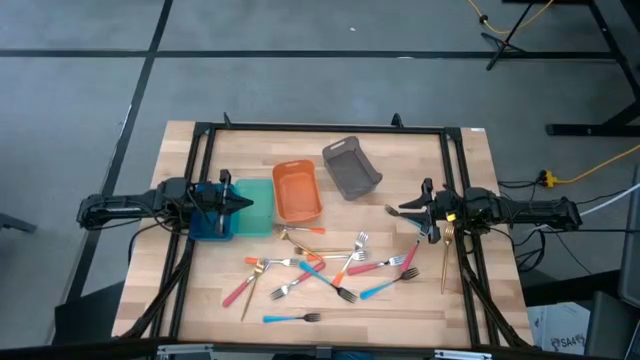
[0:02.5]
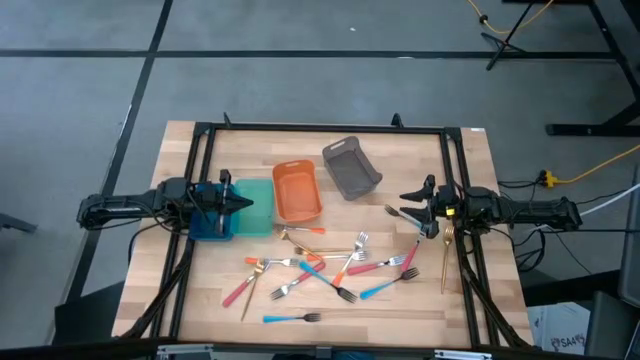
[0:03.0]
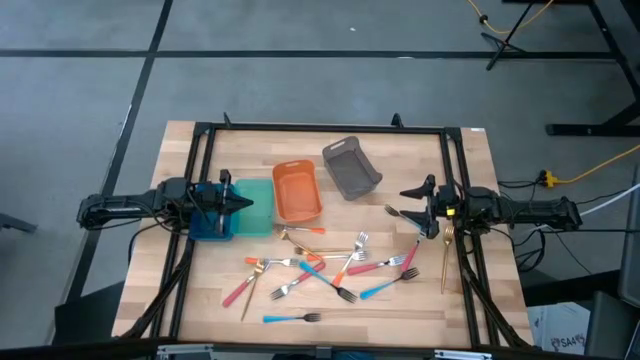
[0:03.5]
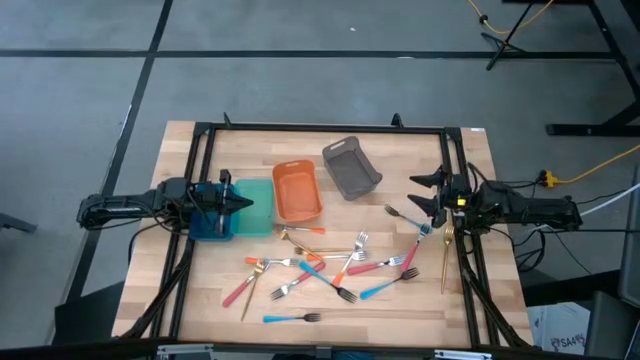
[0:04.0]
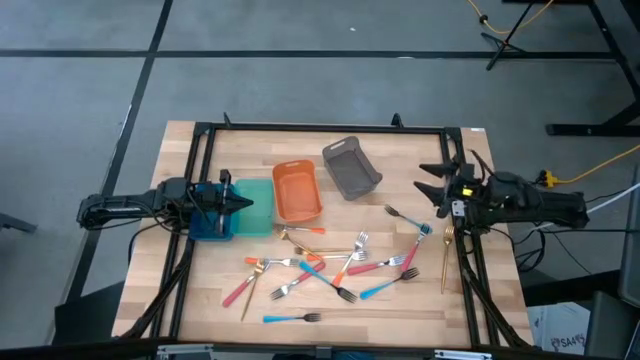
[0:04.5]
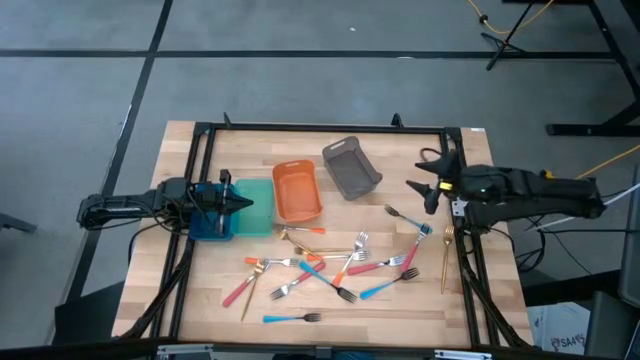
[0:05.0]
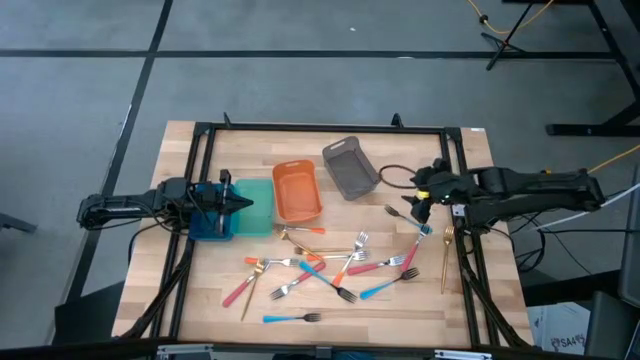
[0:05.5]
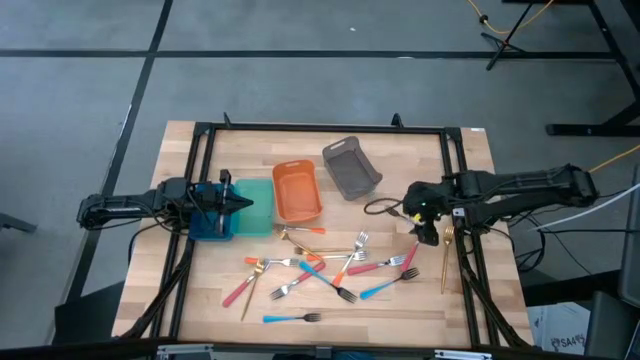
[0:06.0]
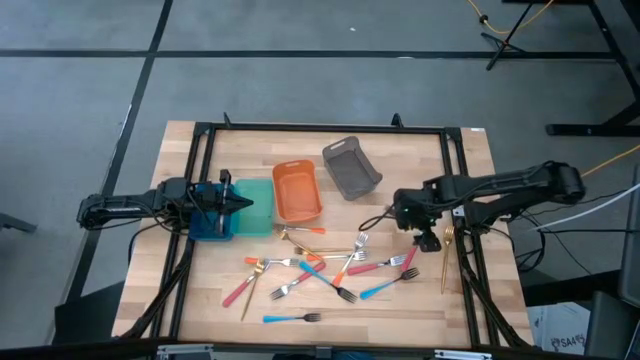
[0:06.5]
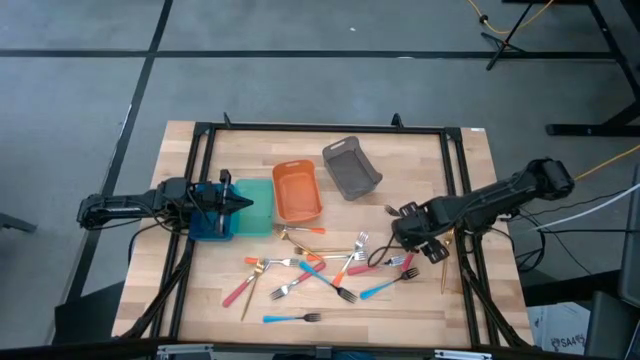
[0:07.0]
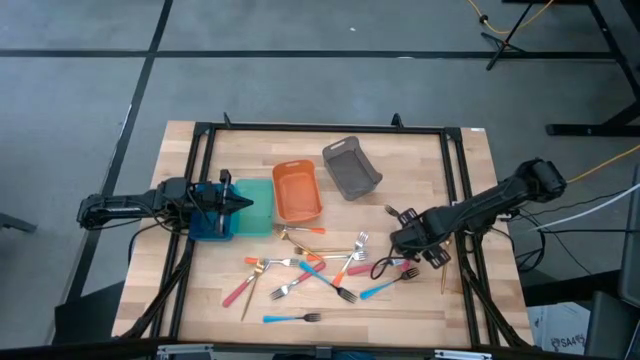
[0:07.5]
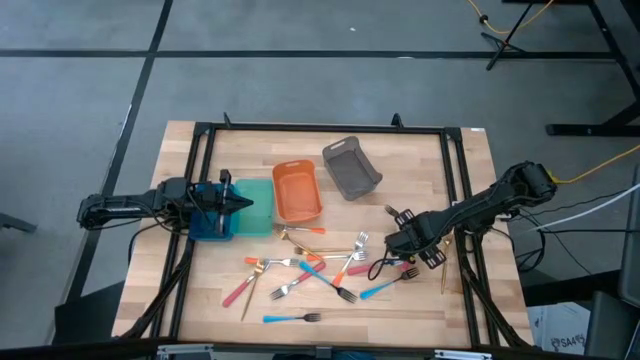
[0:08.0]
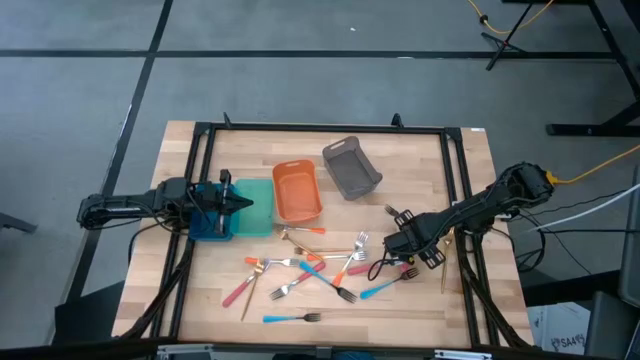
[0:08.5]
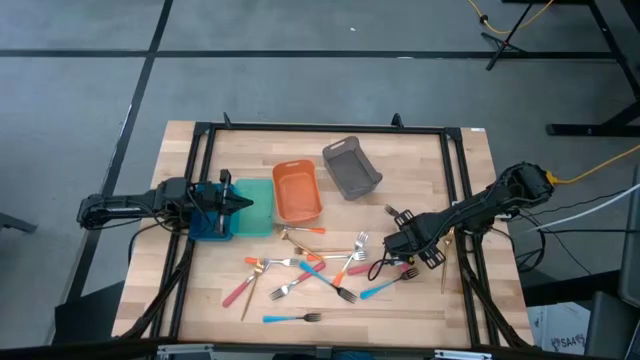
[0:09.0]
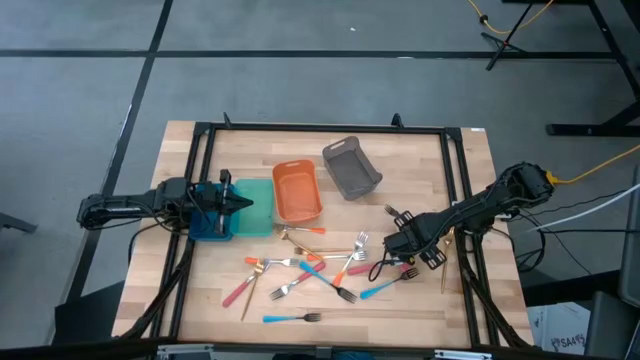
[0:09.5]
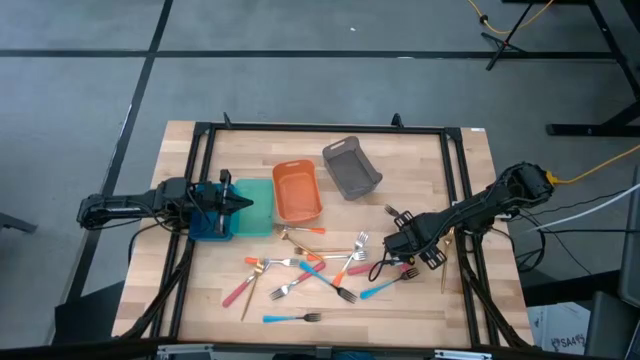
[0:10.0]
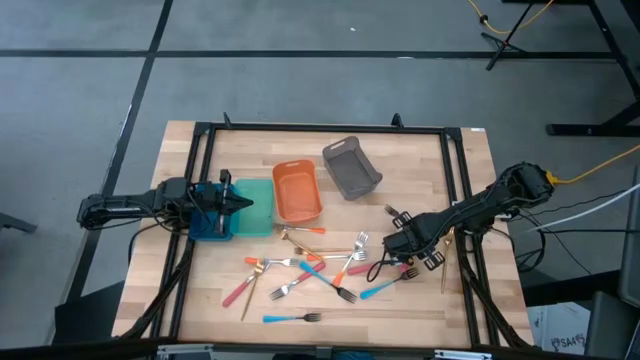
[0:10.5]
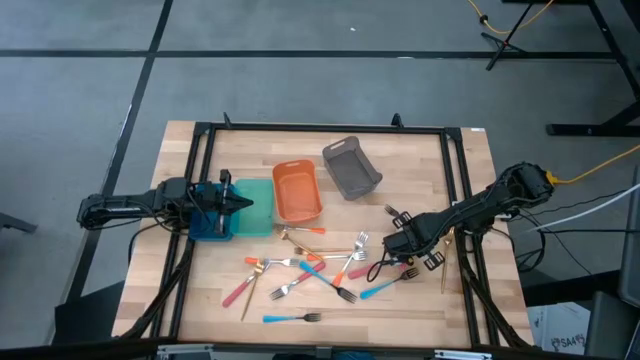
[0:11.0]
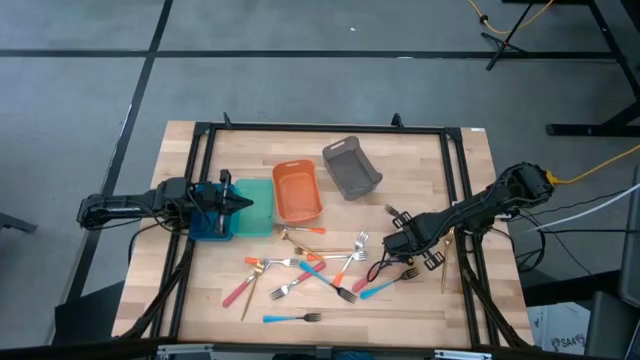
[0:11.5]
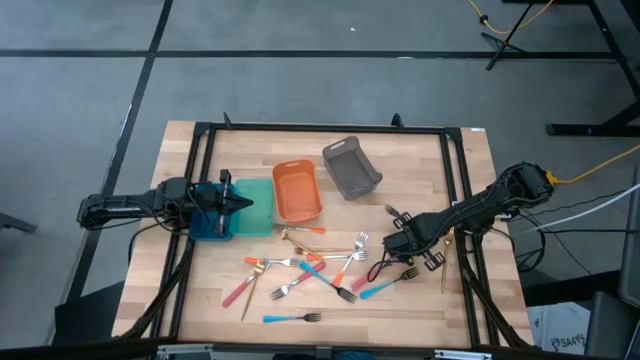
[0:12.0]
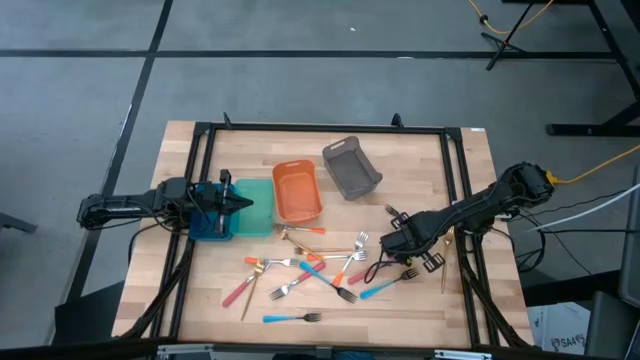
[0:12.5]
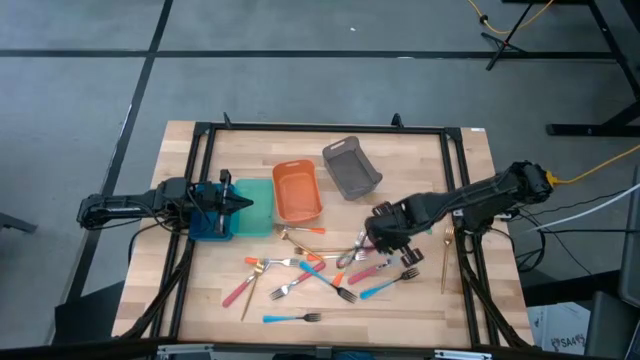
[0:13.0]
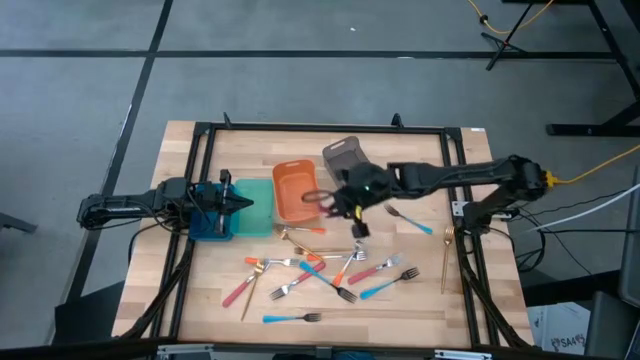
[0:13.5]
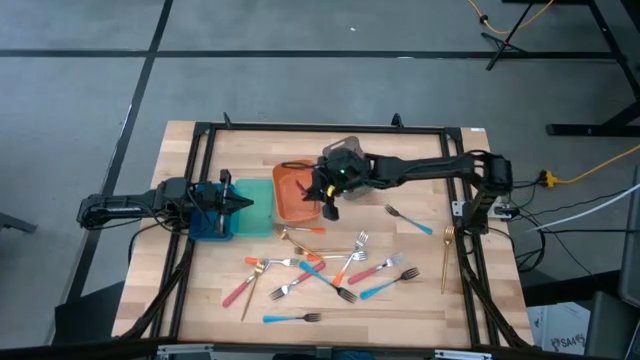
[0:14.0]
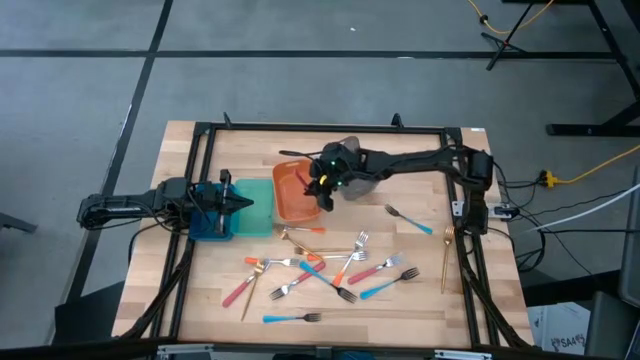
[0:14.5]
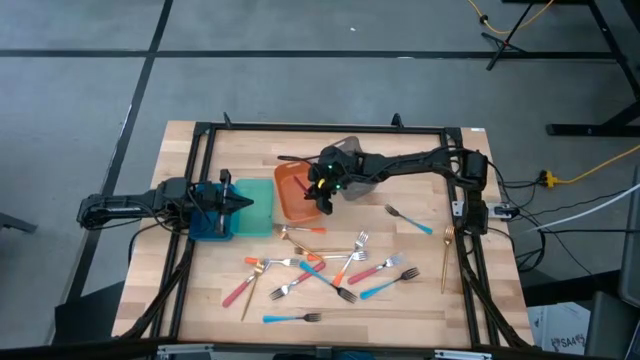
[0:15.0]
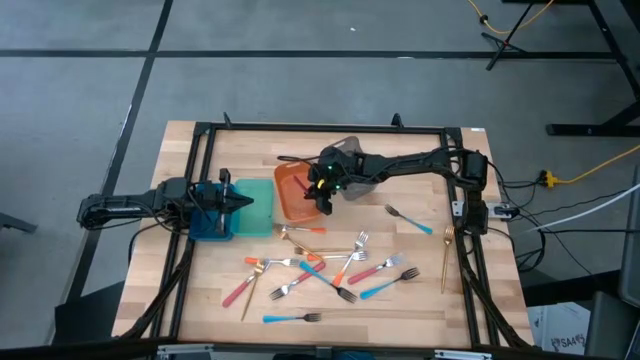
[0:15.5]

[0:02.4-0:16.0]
Task: Sort silverware by color (type)
Put the pink fork into the orange bin

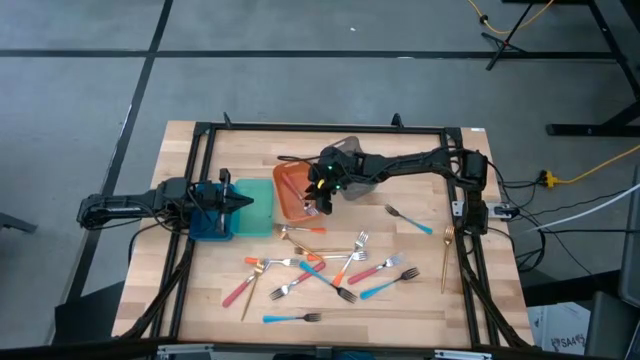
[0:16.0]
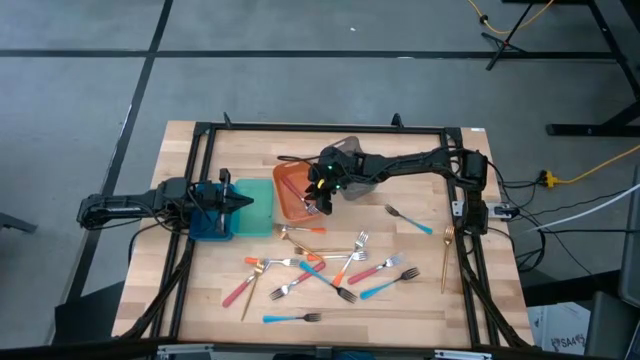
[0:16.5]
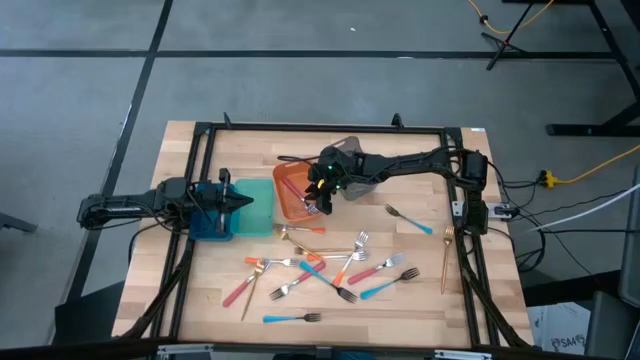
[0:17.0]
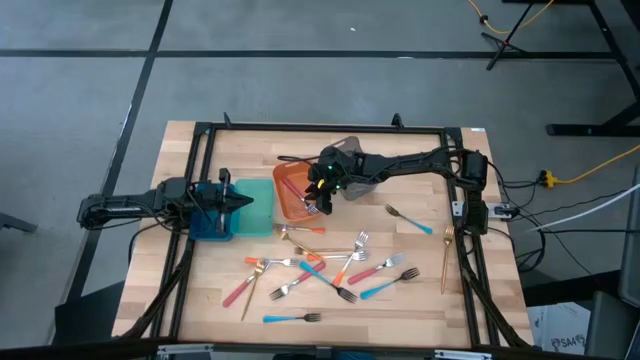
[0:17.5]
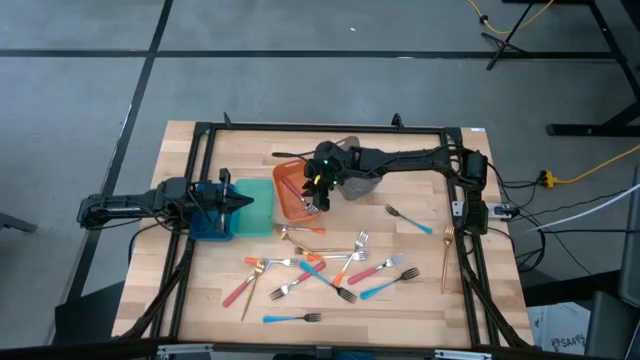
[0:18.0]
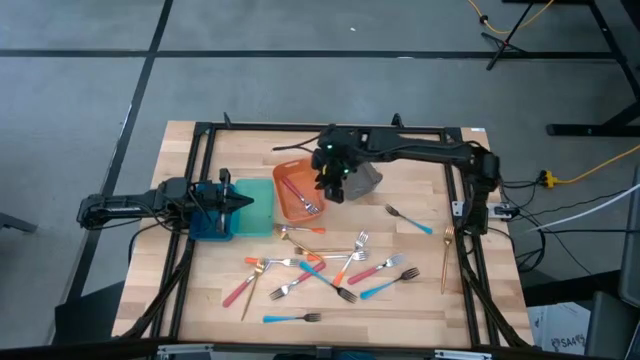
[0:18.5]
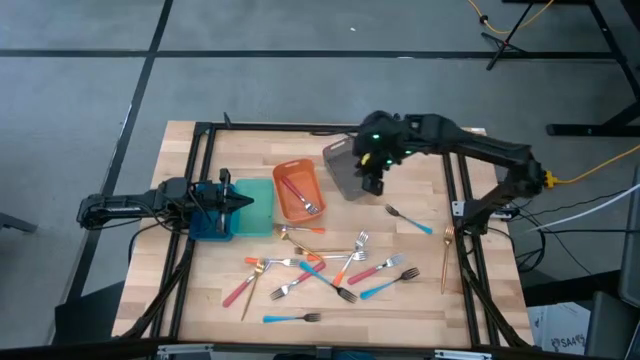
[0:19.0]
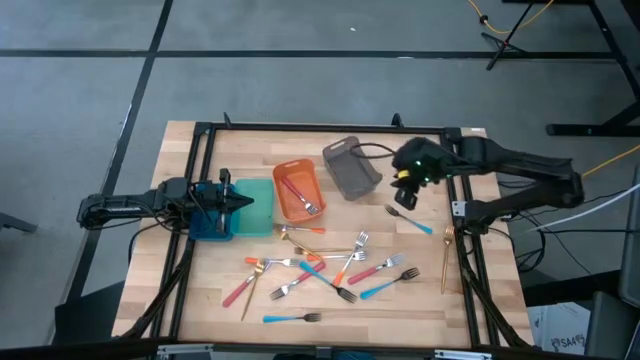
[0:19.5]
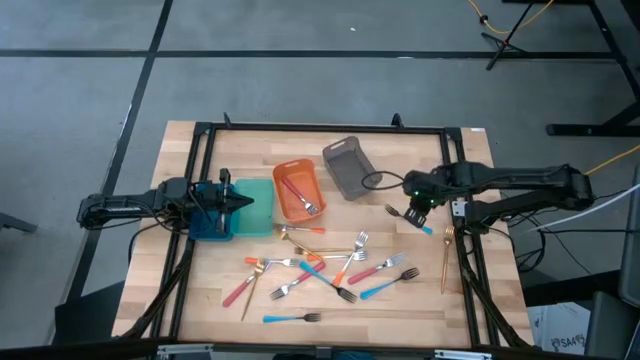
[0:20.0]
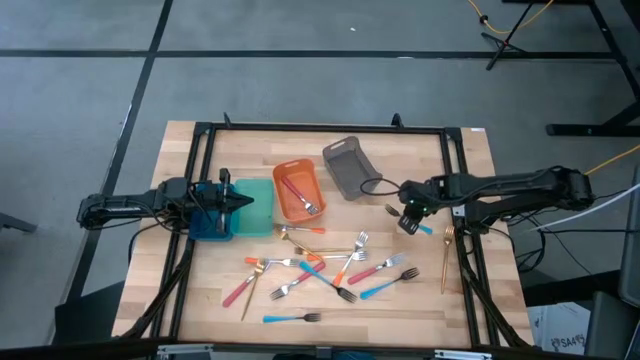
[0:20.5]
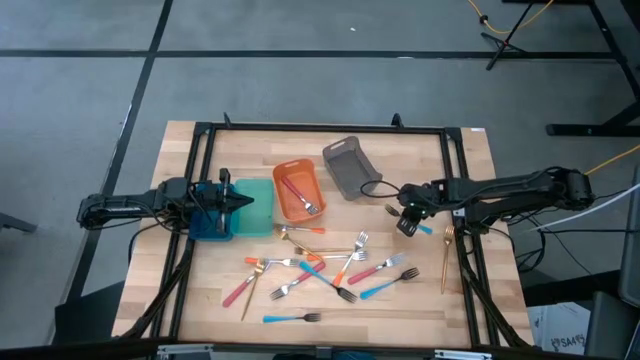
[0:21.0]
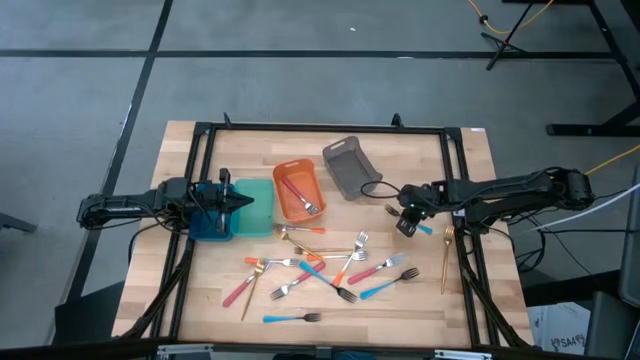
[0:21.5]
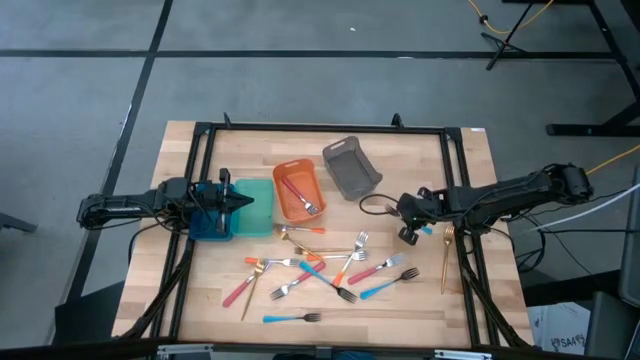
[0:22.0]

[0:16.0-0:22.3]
Put the blue fork into the black bin

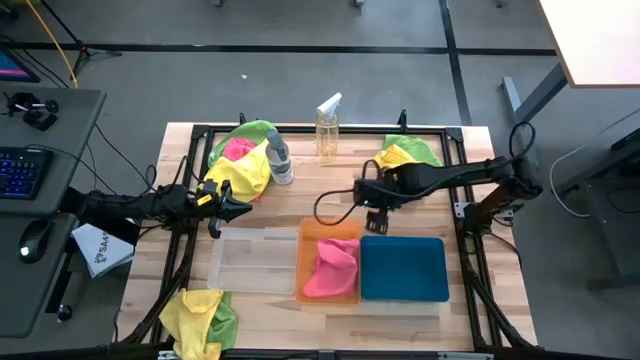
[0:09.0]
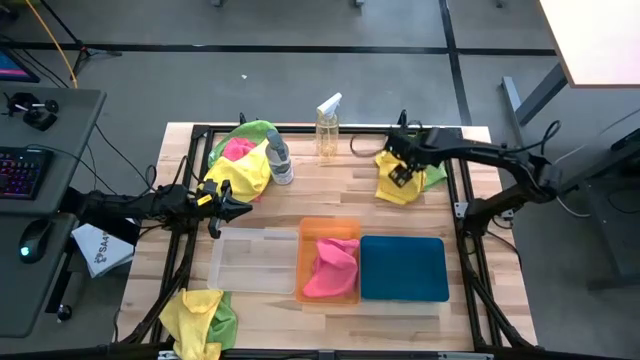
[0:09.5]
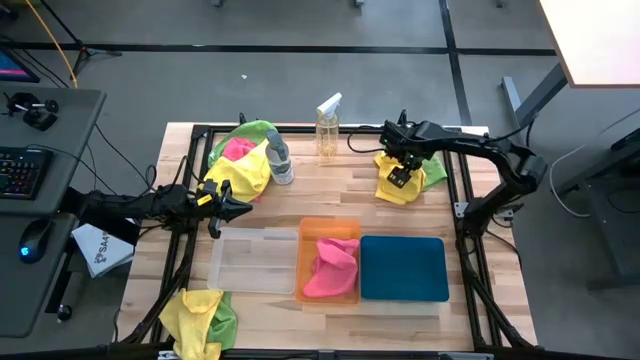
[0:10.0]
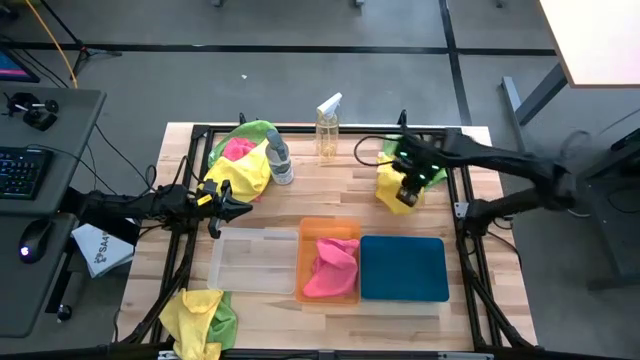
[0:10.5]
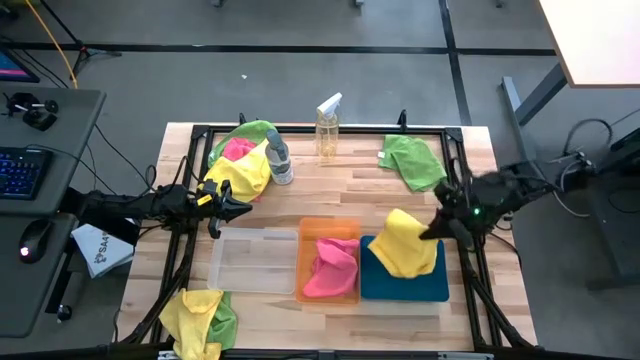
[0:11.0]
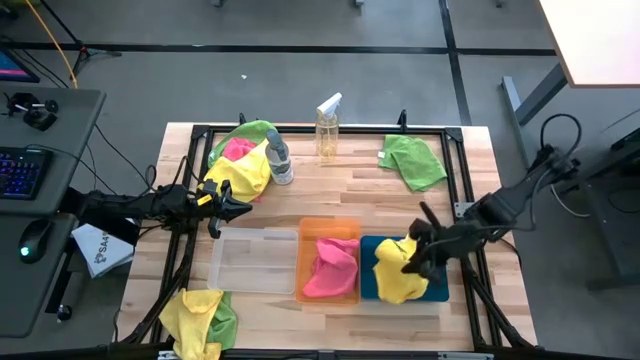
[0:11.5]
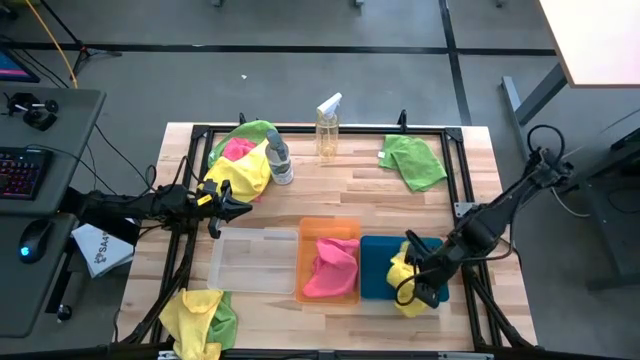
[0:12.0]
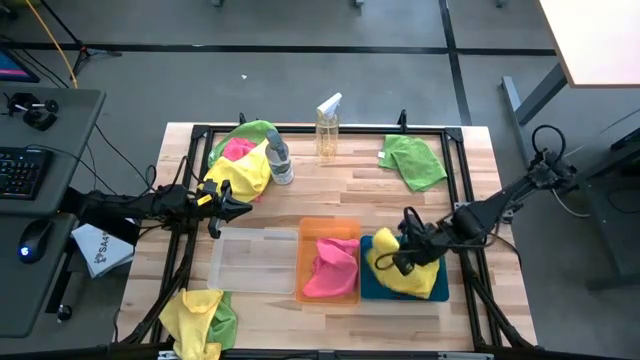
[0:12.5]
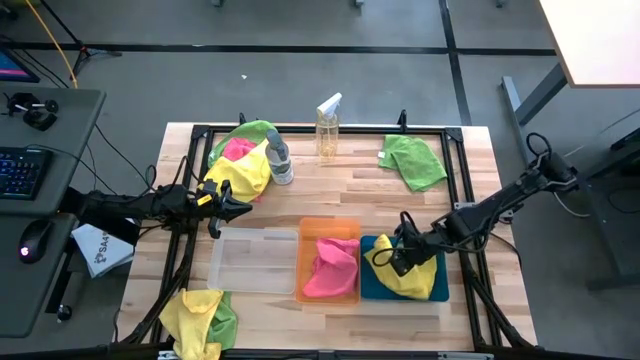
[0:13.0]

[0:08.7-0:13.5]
Task: Sort microfiber towel by color & place in baskets
Put the top right yellow towel into the blue bin
